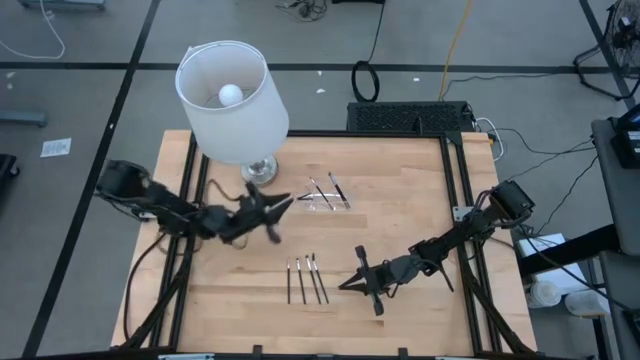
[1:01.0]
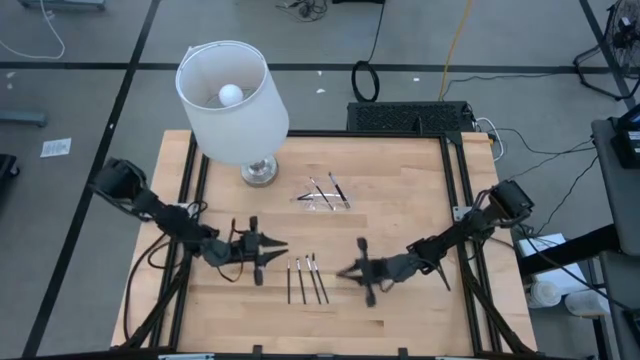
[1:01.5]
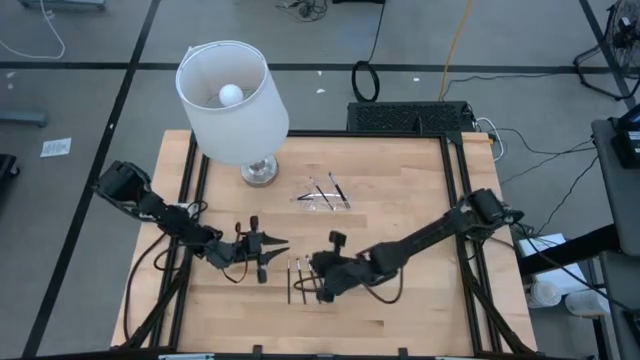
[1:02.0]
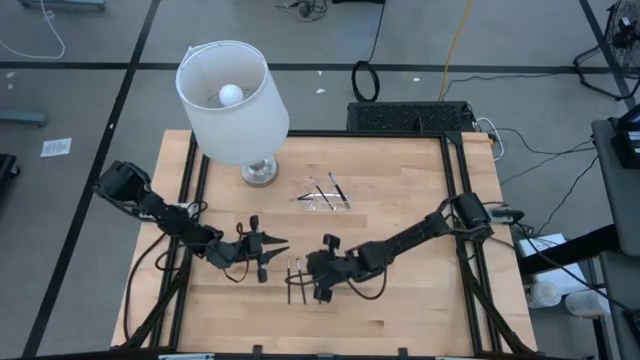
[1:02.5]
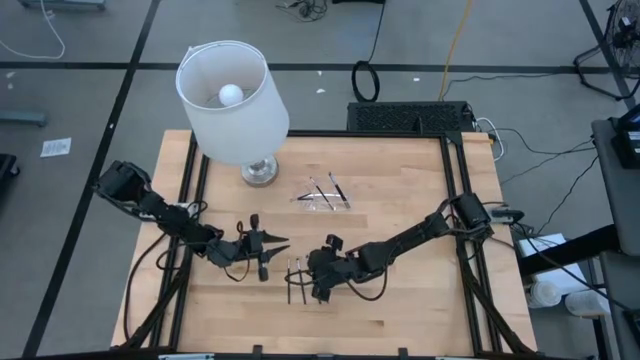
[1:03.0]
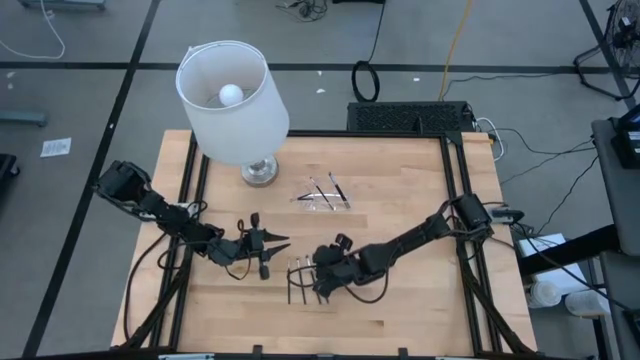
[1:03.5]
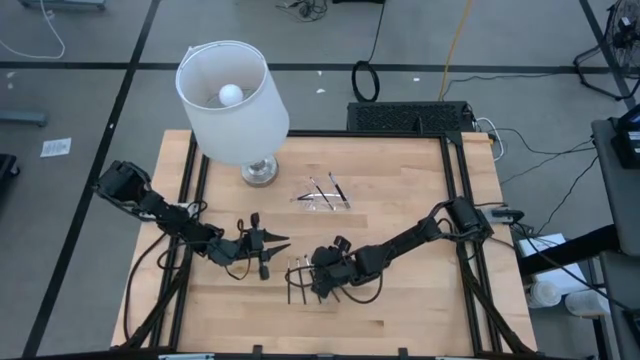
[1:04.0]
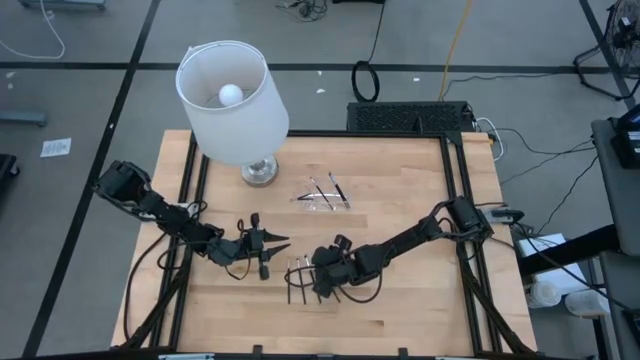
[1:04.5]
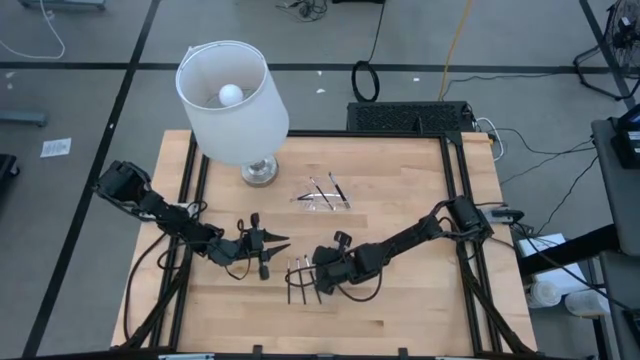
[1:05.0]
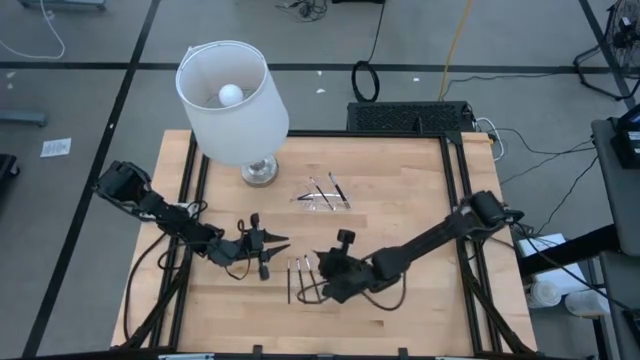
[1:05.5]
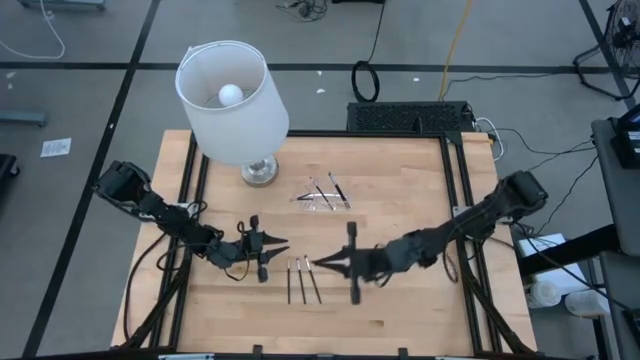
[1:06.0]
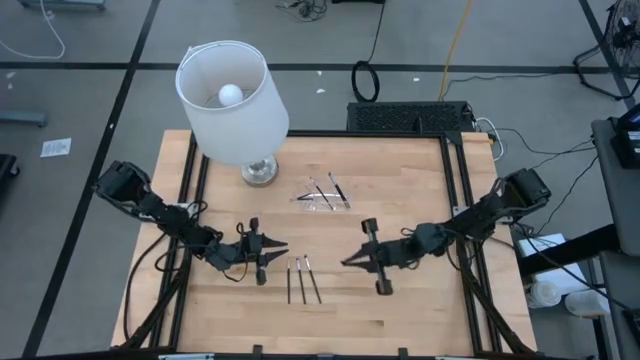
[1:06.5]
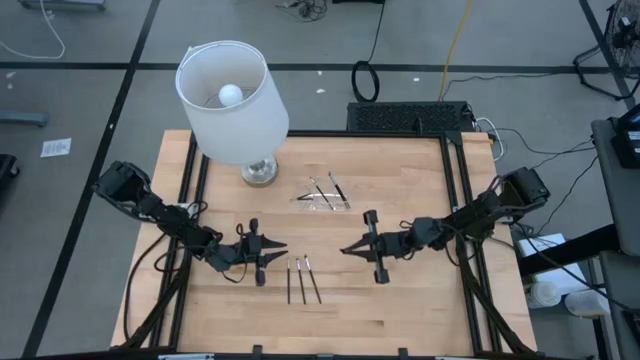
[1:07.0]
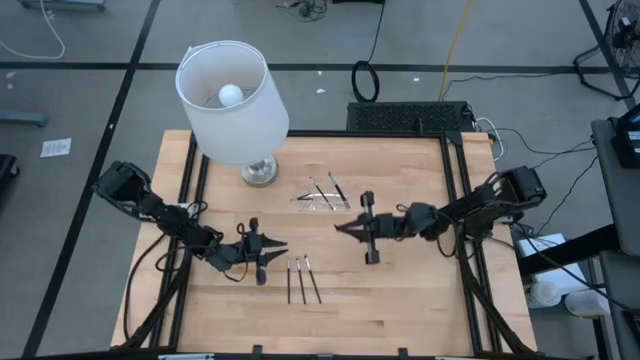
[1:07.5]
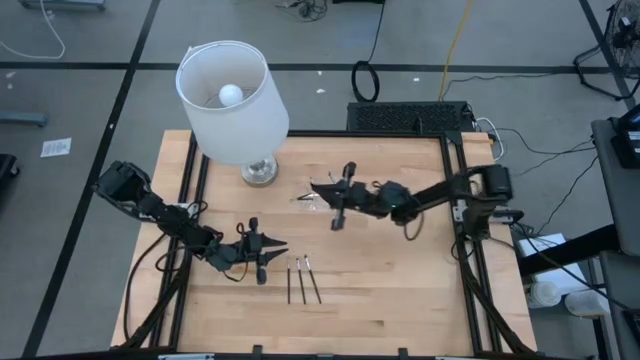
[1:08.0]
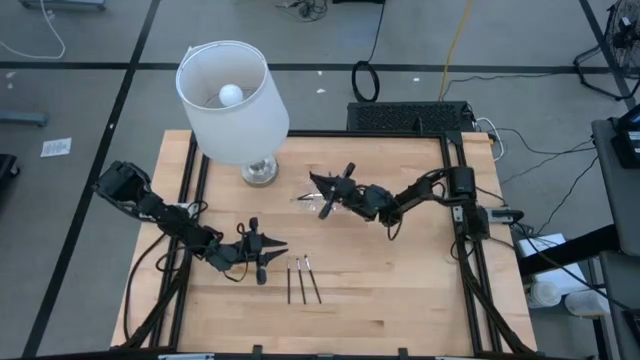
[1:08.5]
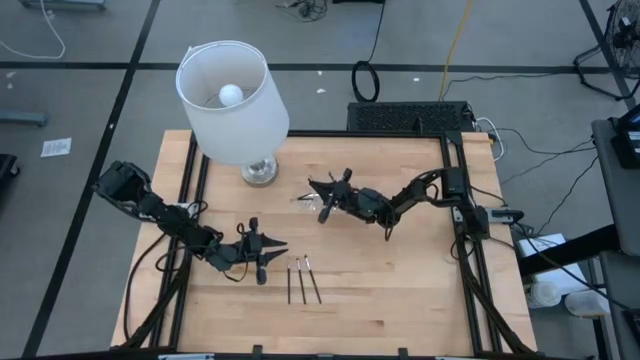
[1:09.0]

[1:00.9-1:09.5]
Task: Put items in baskets/containers
Put the black brow brush into the transparent organizer

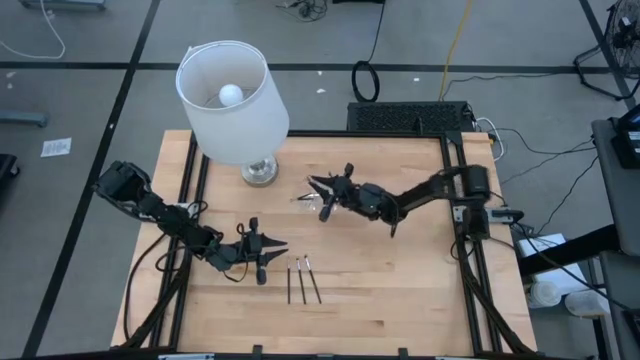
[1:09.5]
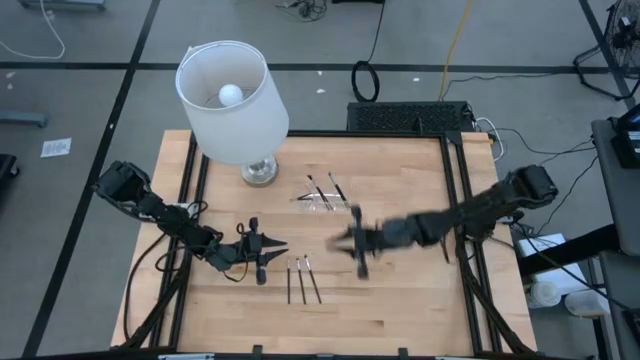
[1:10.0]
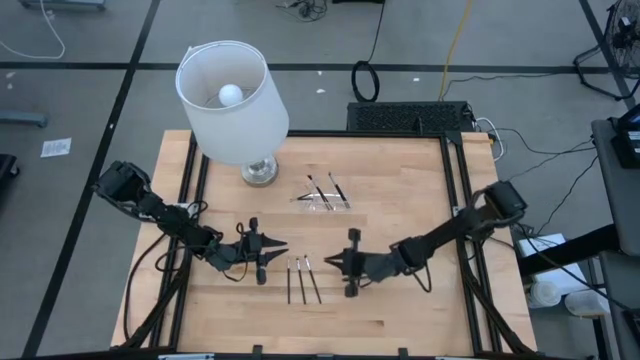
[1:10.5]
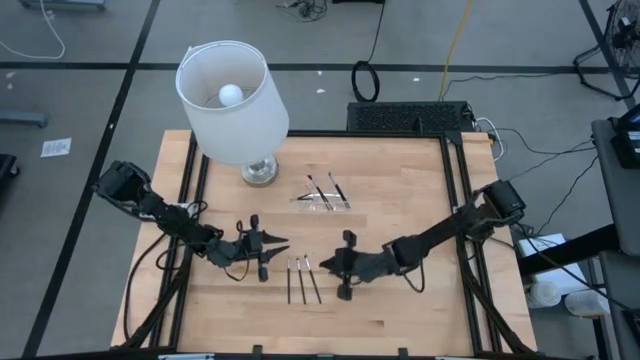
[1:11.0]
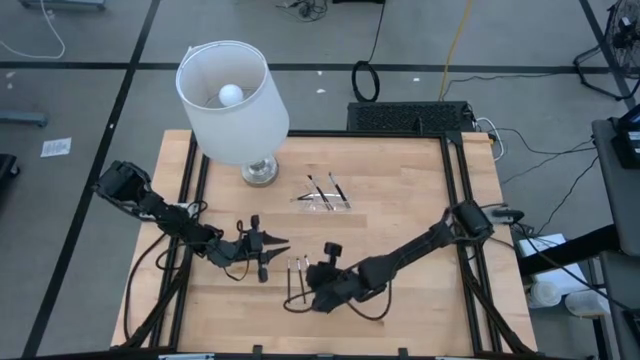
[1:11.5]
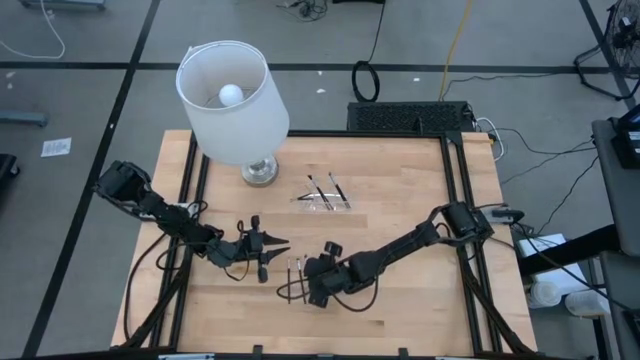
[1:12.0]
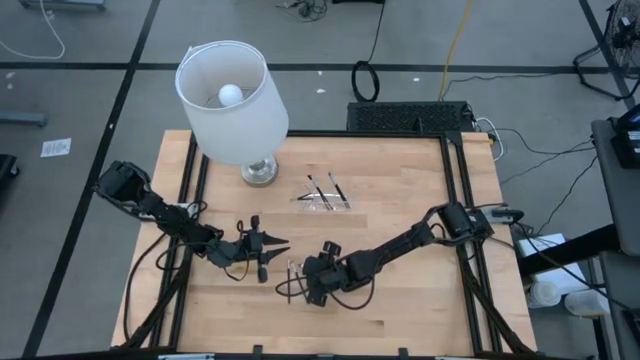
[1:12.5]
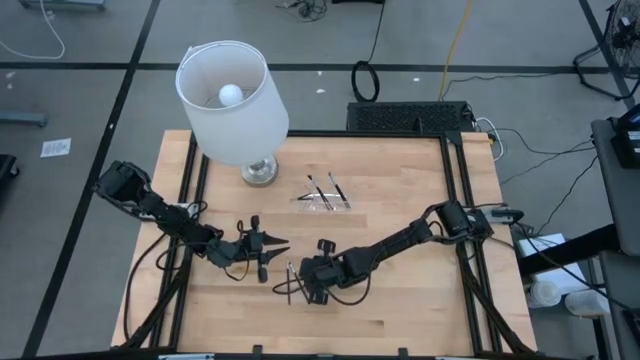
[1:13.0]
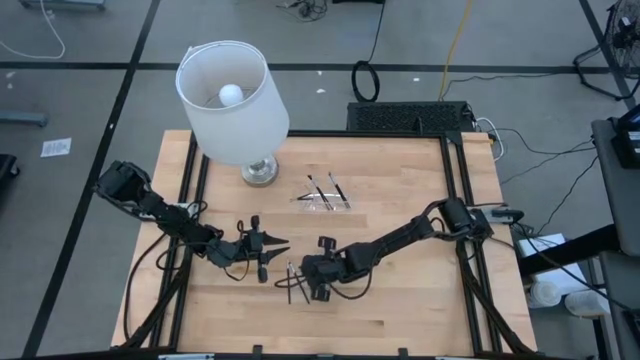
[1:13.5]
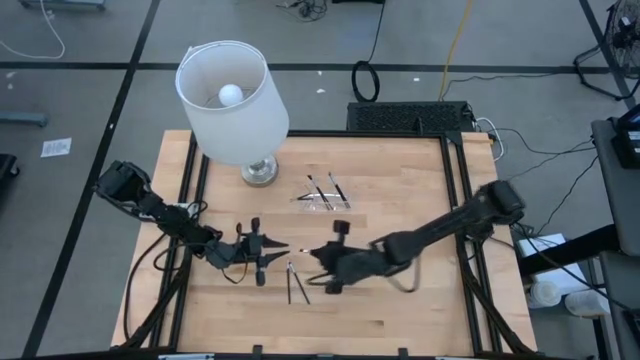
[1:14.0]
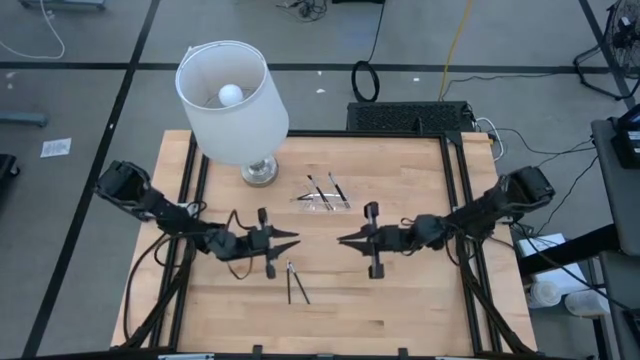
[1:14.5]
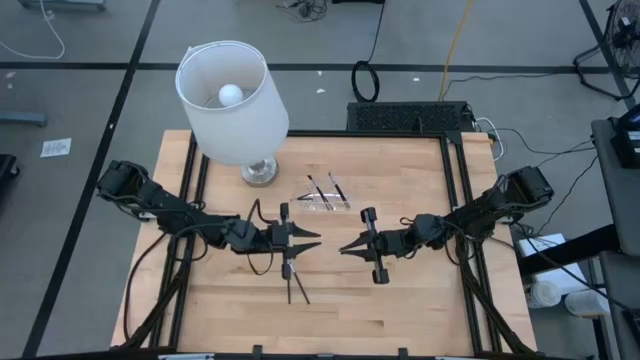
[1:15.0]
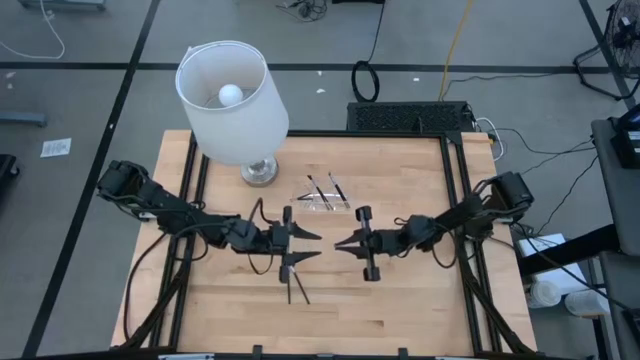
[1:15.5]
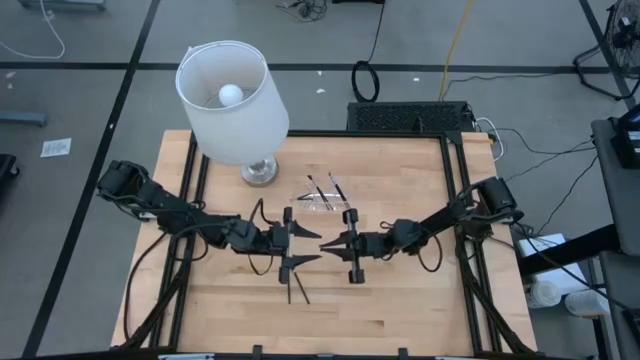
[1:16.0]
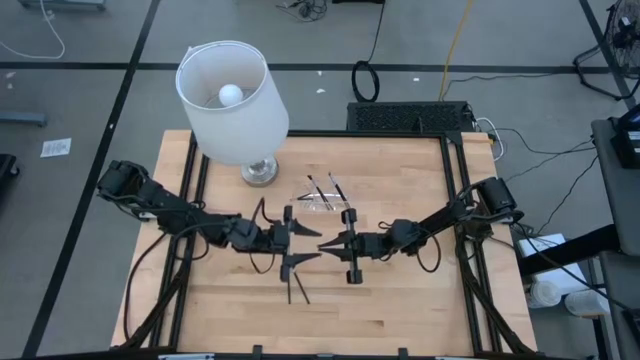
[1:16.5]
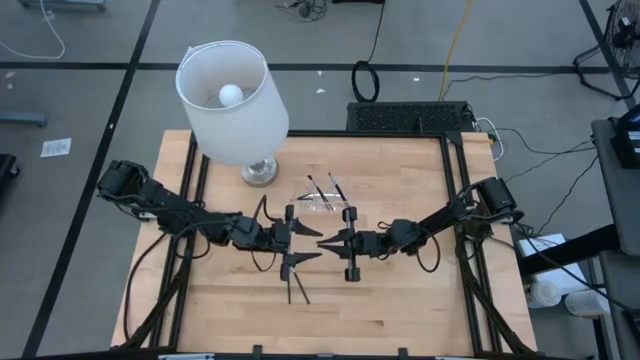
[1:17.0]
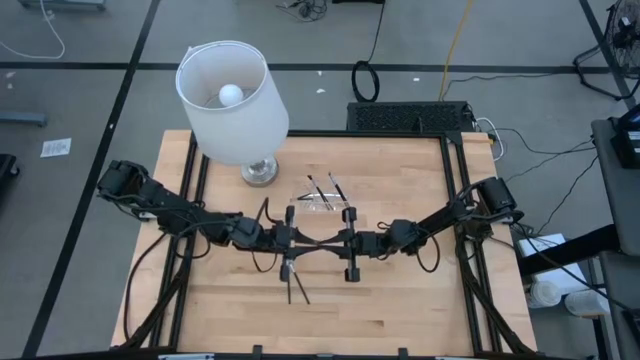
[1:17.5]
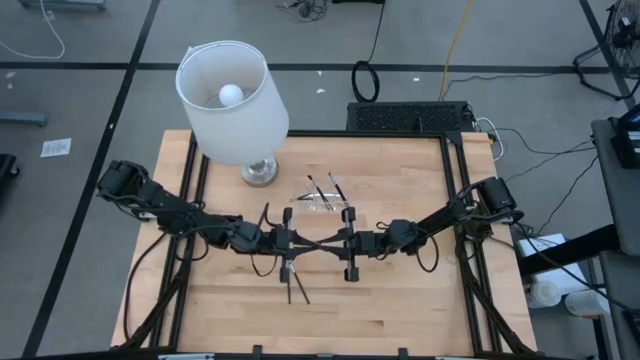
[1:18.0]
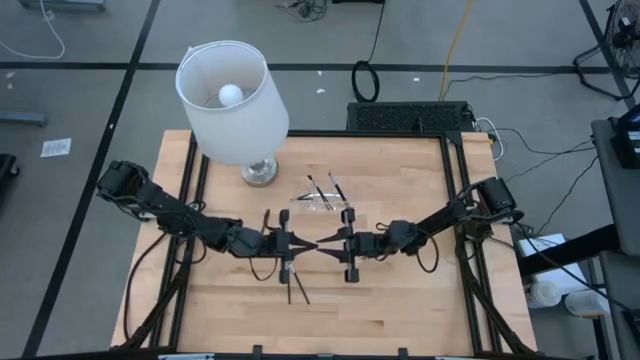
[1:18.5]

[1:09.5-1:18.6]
Put the black eyeshadow brush into the transparent organizer
